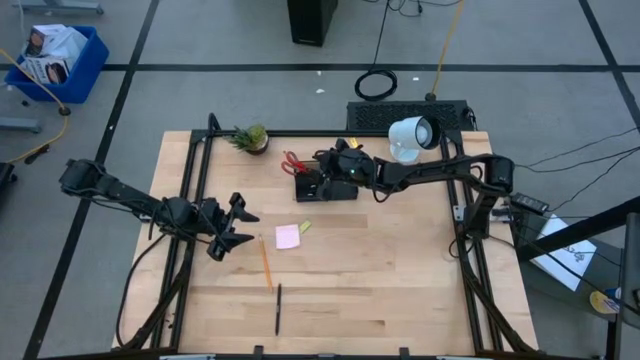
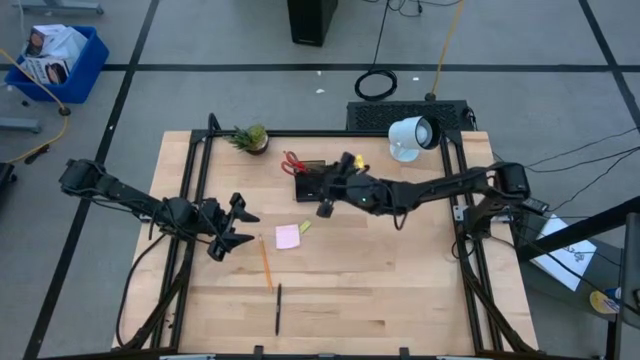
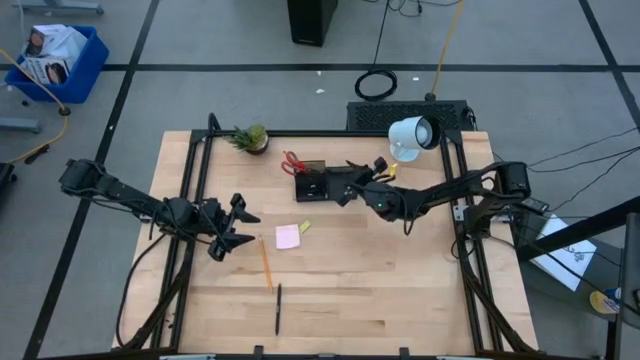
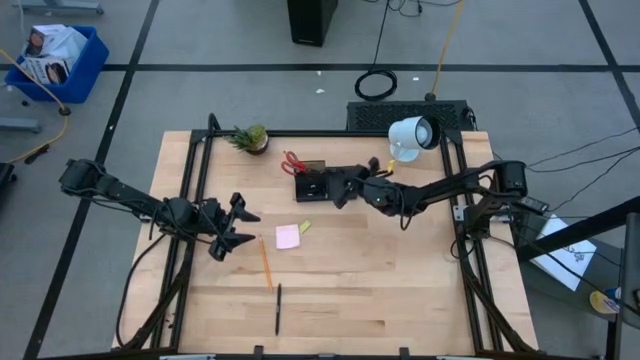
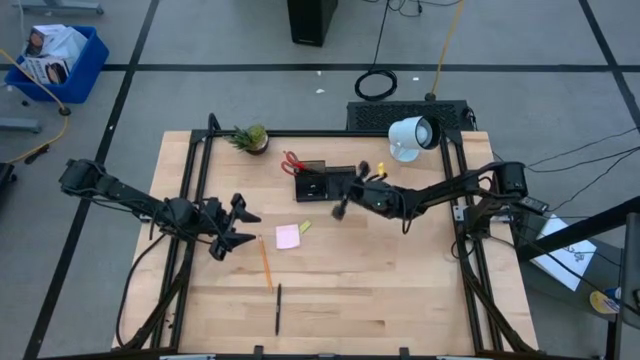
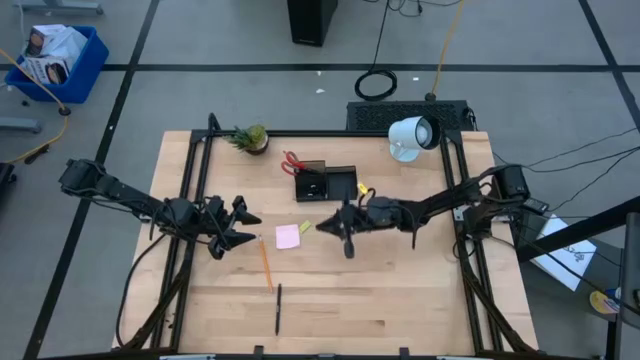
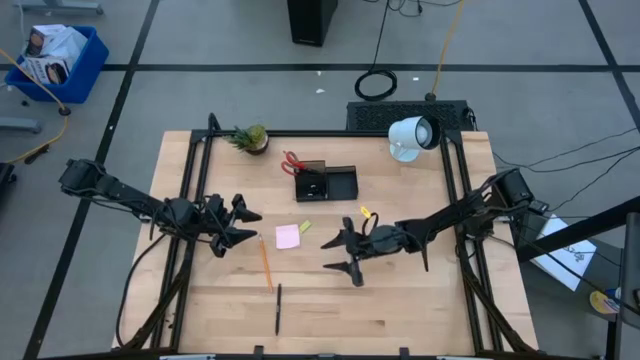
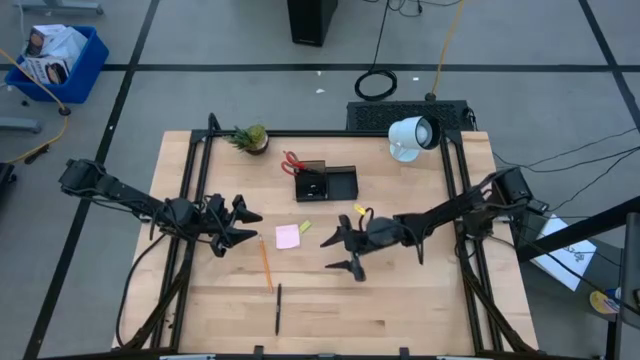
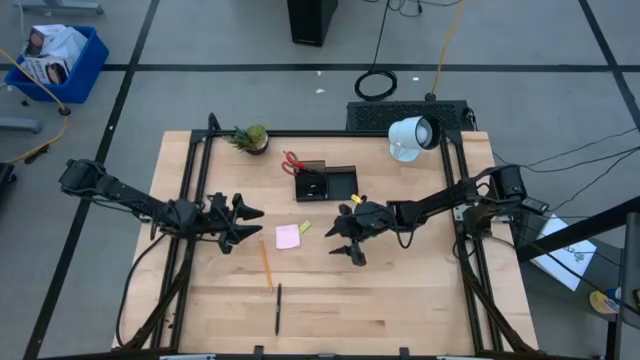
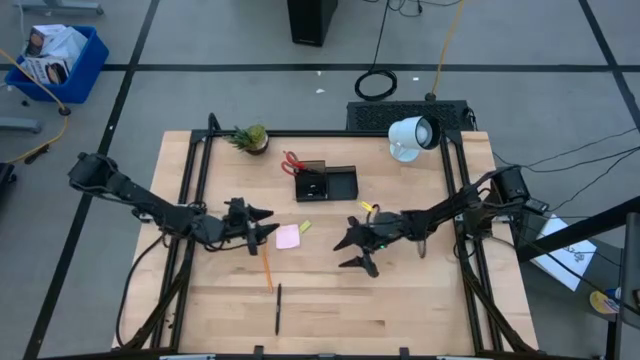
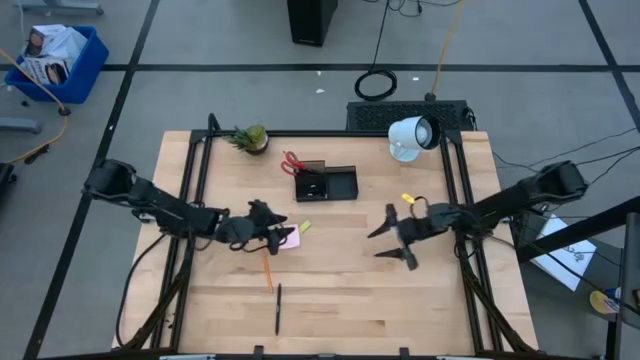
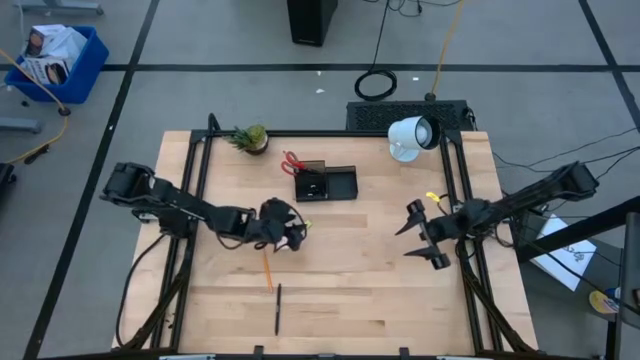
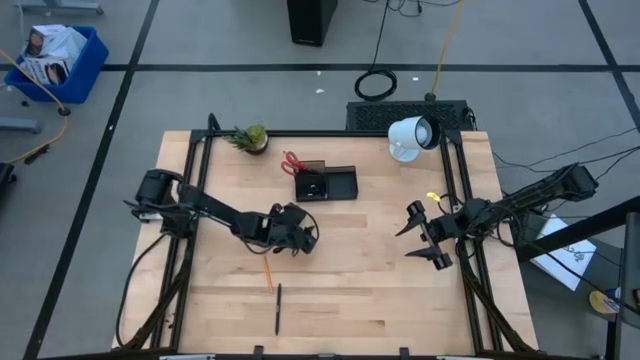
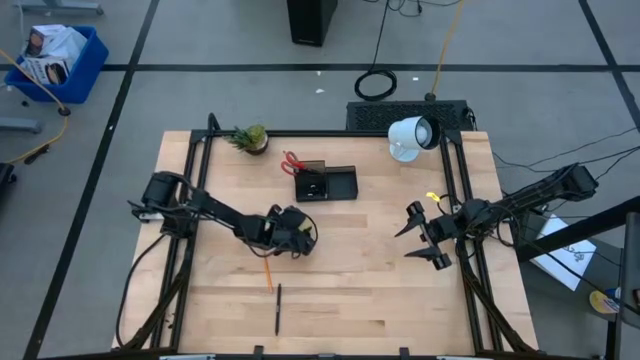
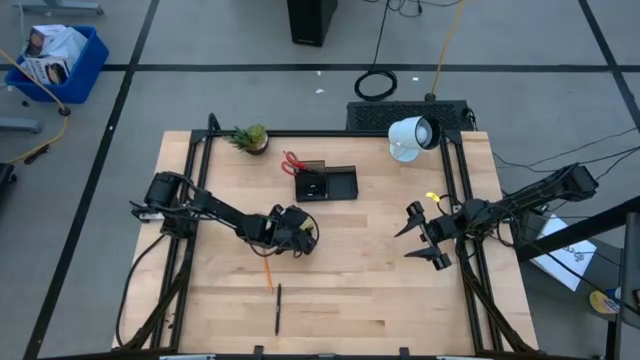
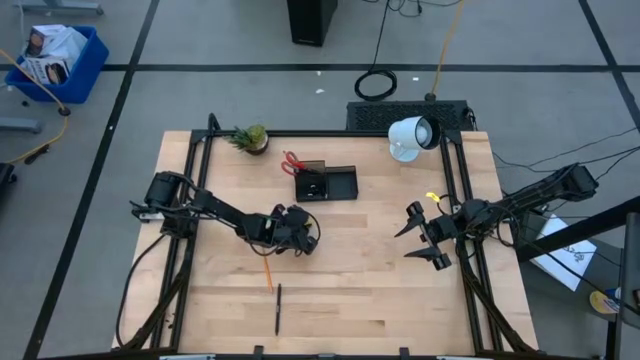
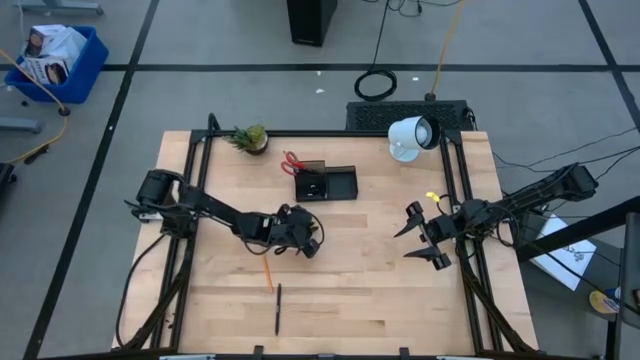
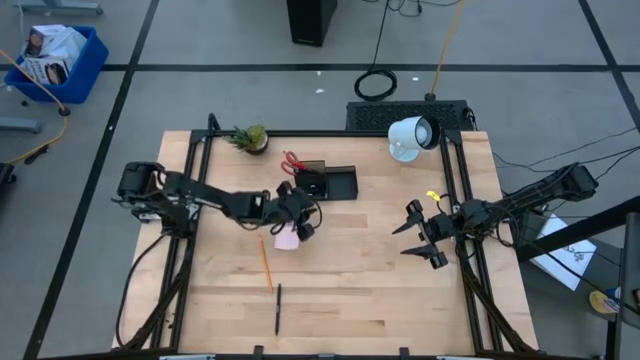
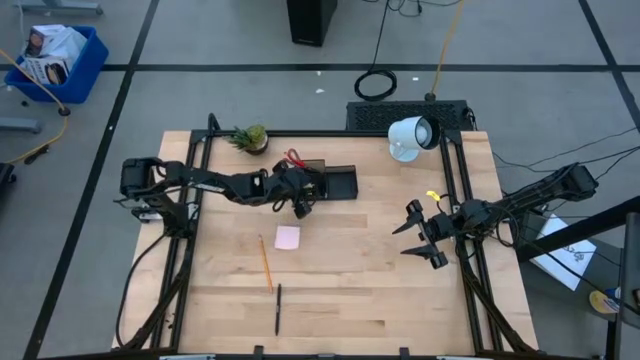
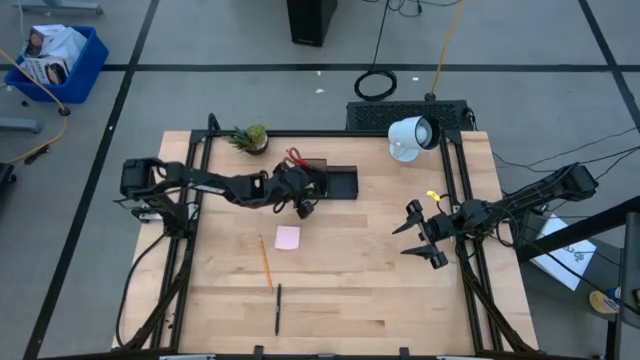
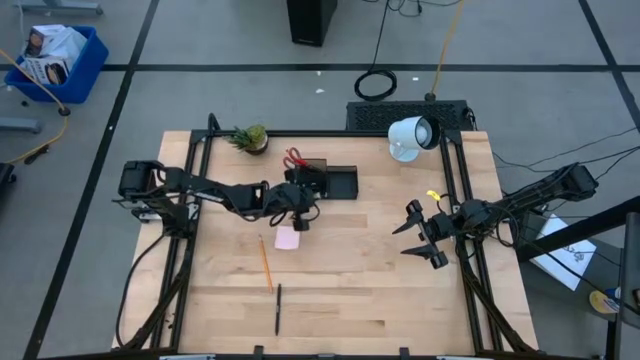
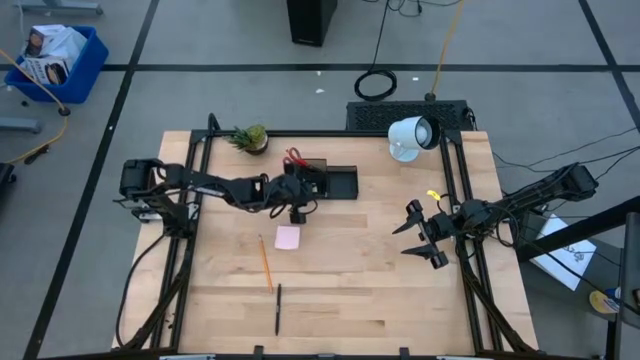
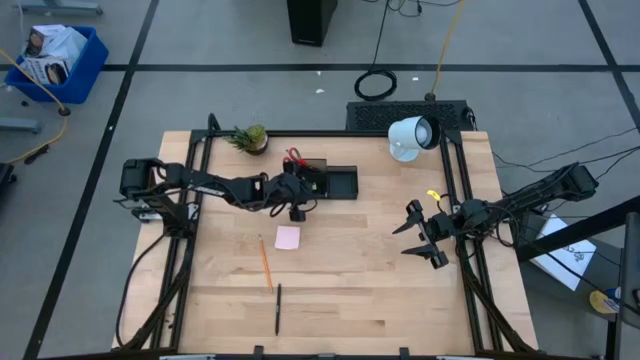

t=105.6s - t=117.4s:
Task: Pick and place office supplies into organizer
Put the eraser into the mesh organizer

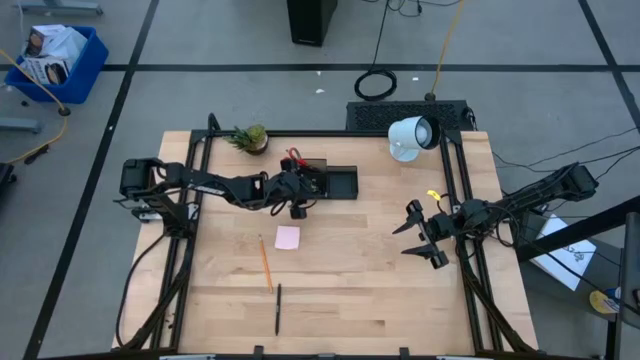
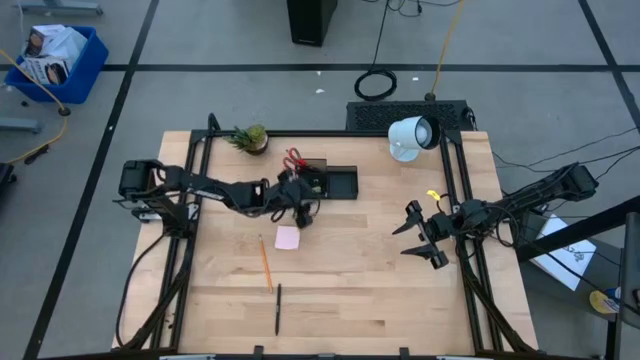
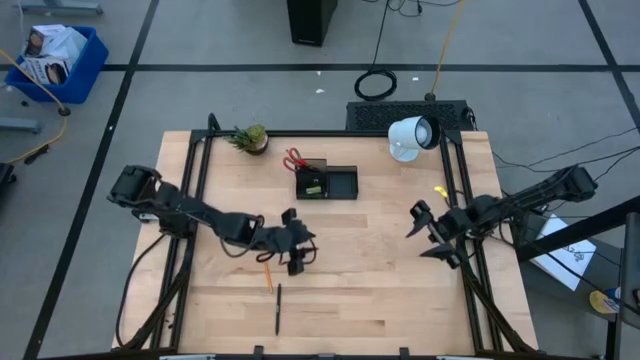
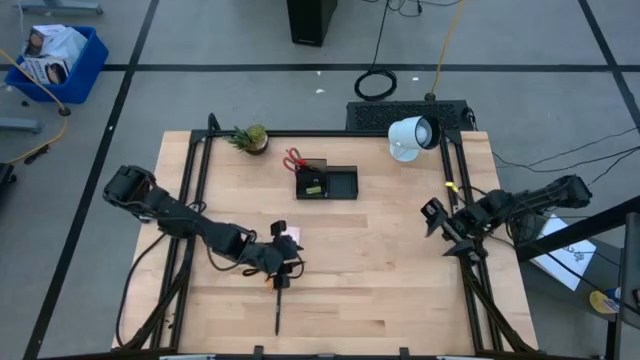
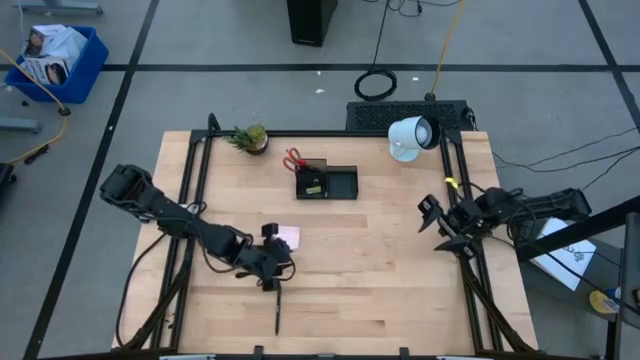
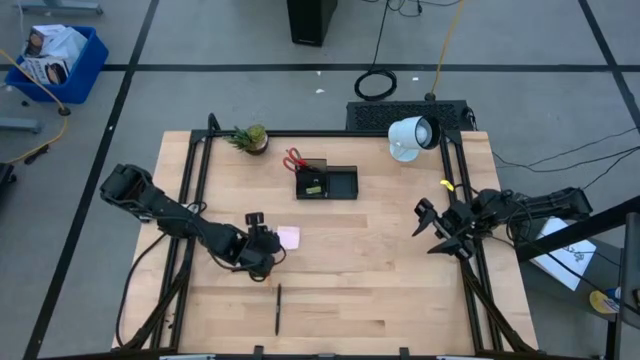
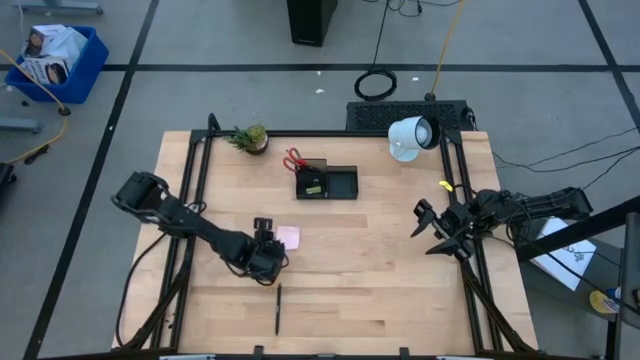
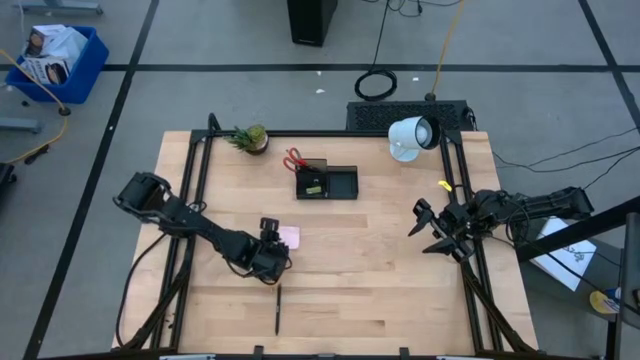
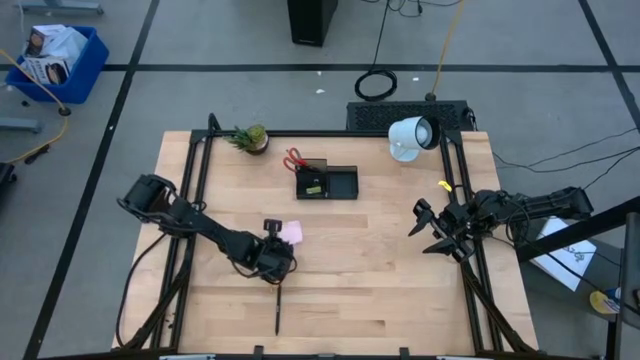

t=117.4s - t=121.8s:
Put the sticky note into the mesh organizer
